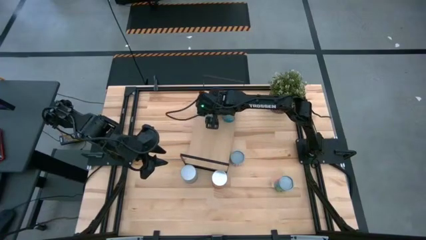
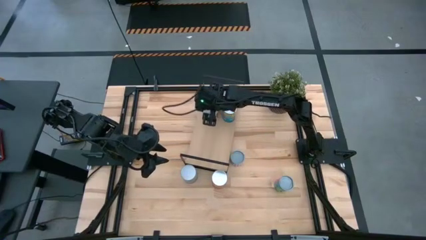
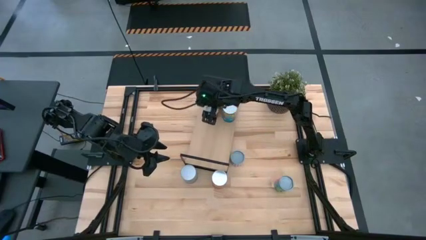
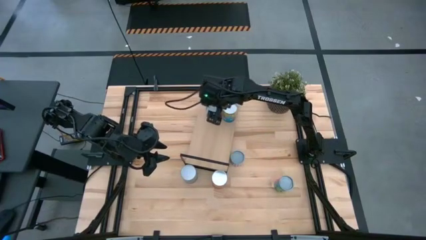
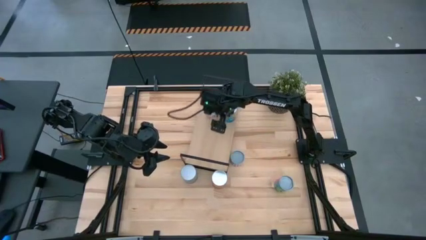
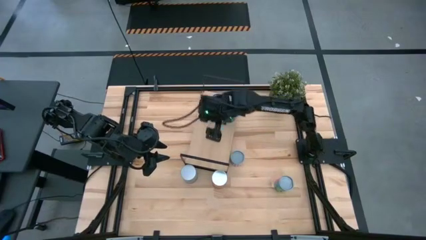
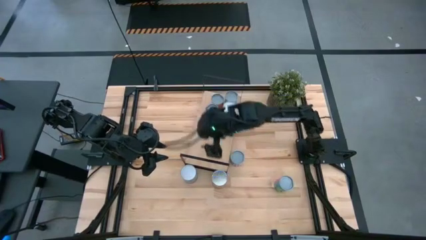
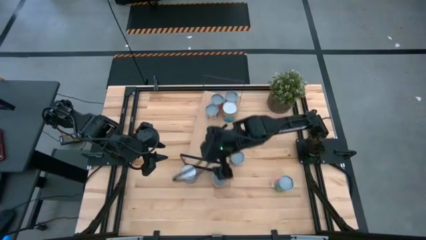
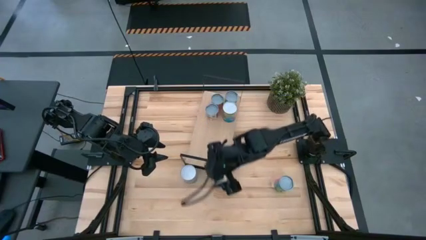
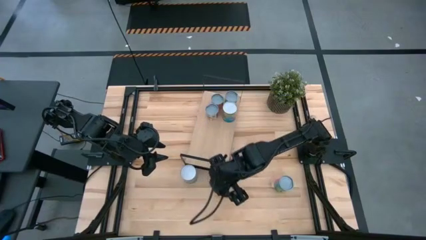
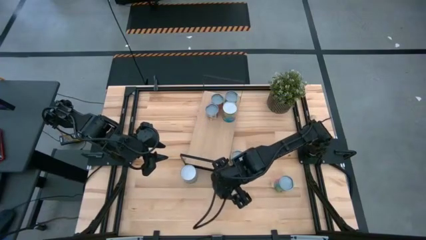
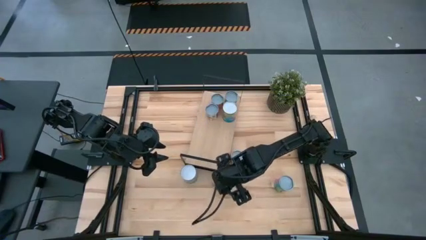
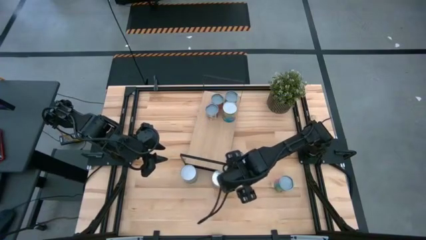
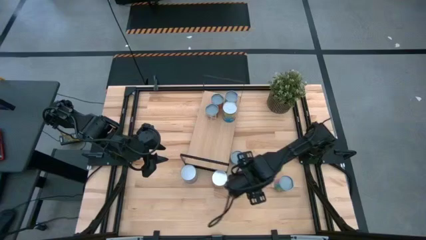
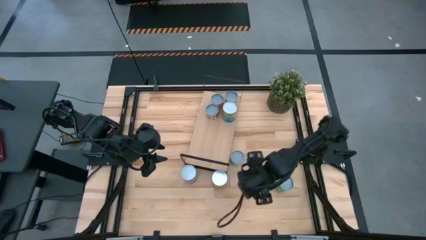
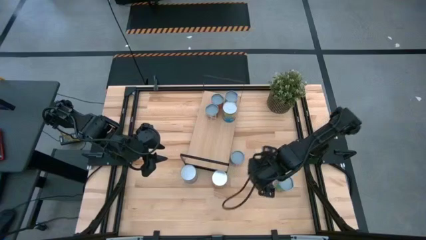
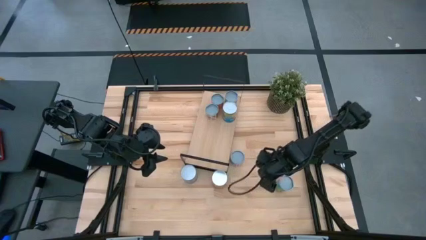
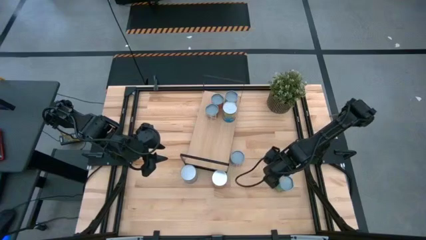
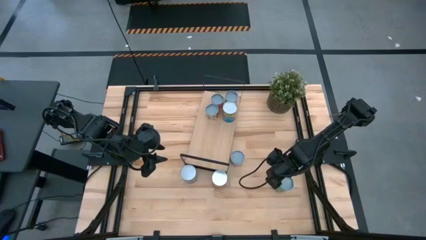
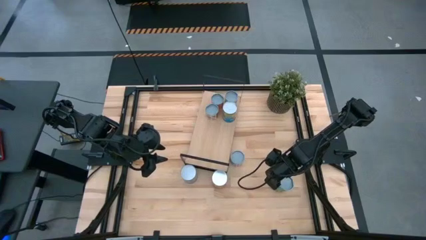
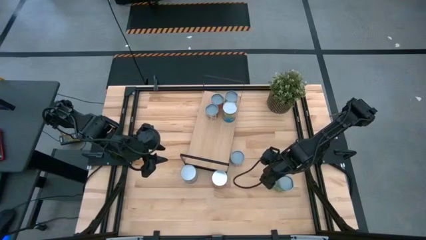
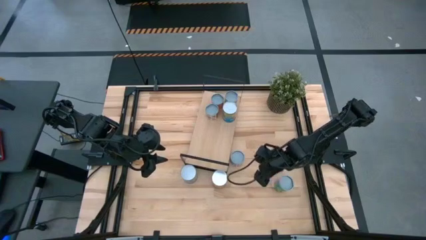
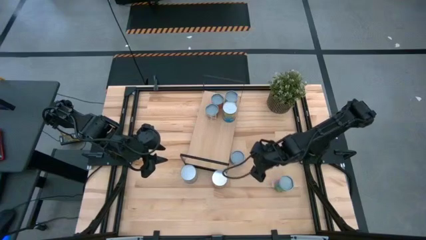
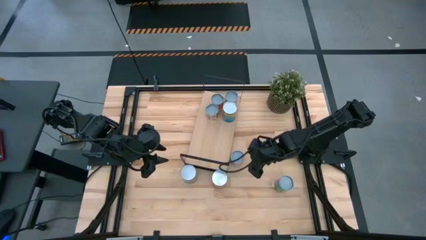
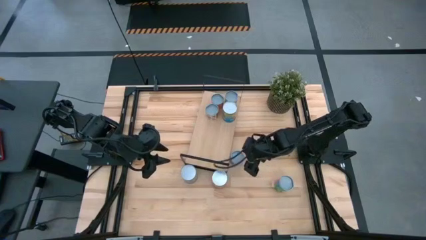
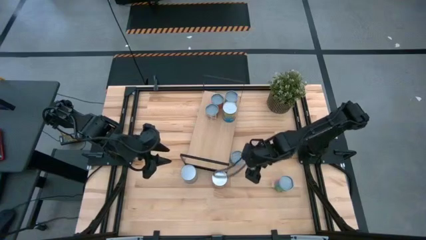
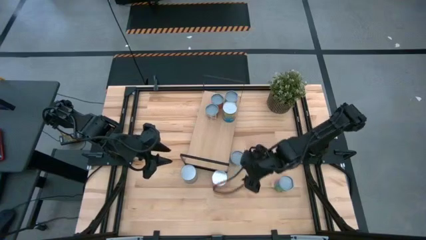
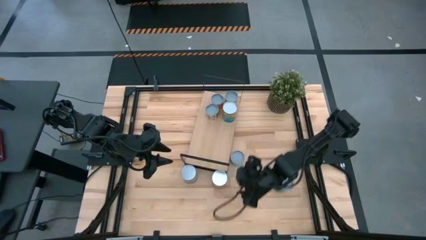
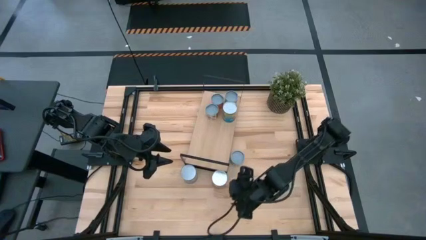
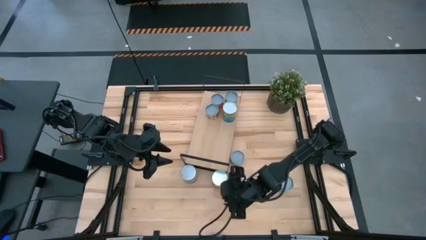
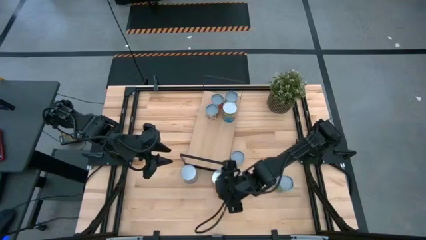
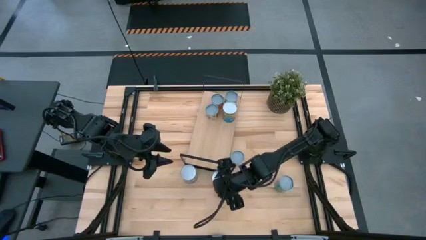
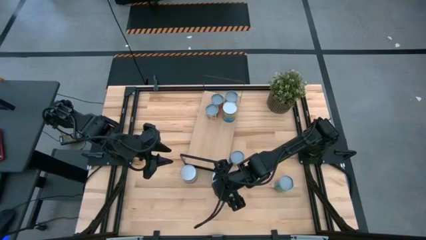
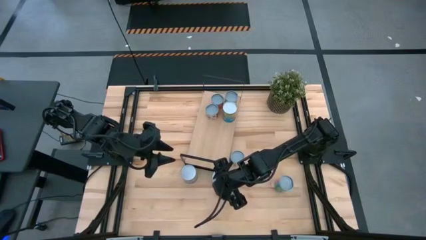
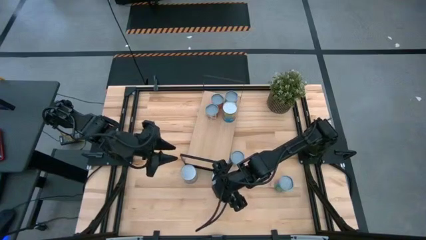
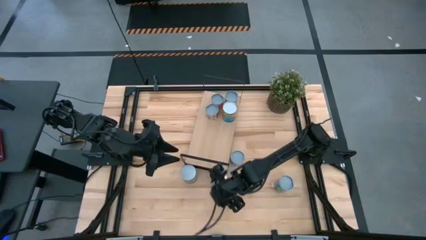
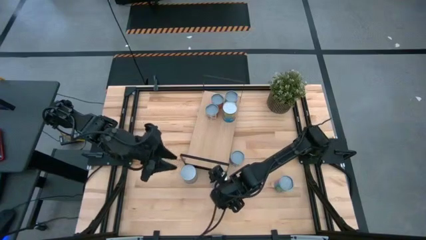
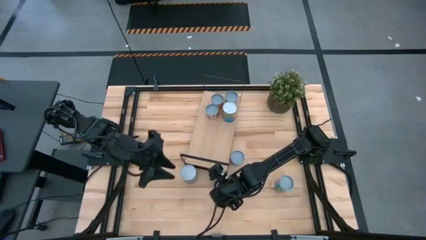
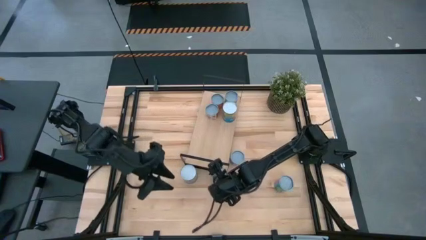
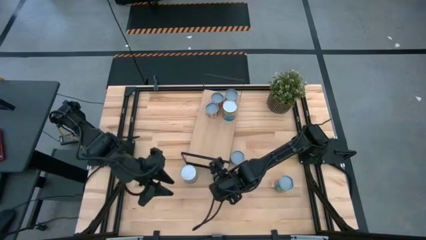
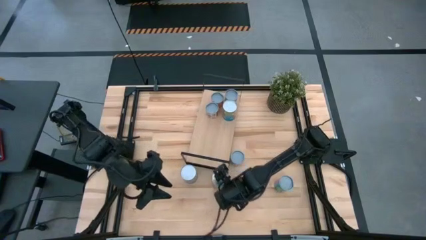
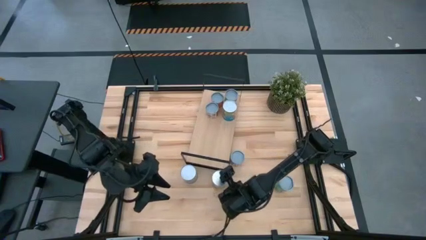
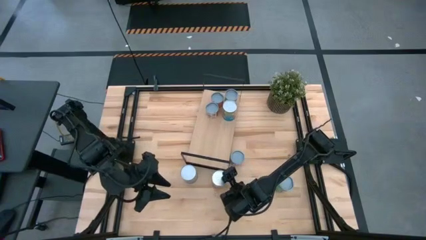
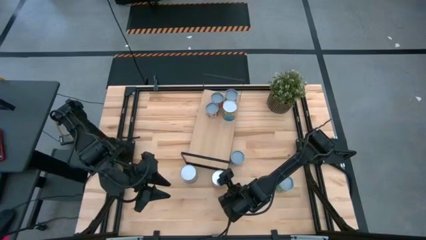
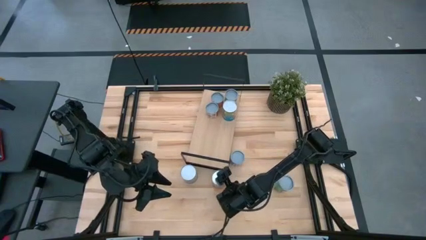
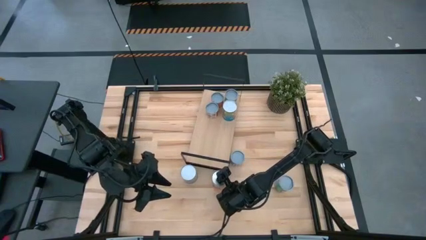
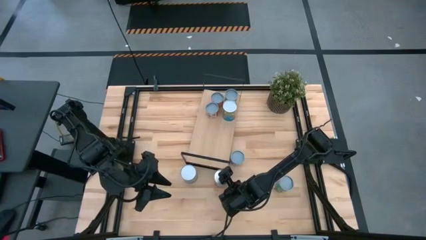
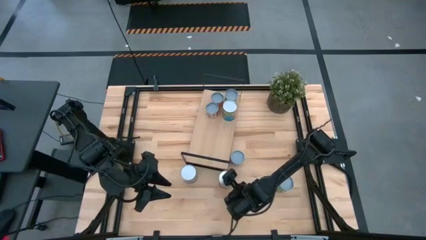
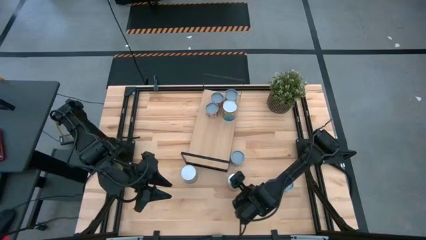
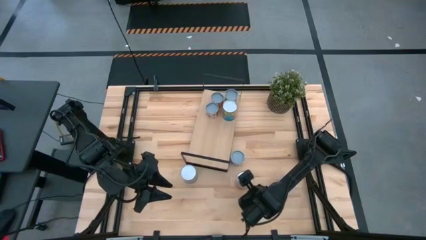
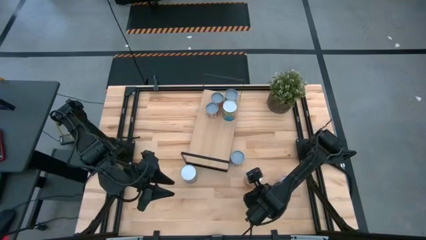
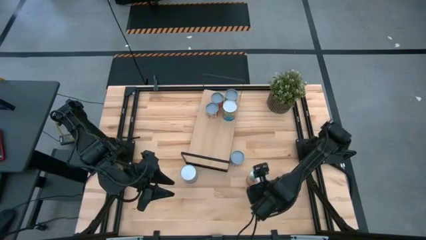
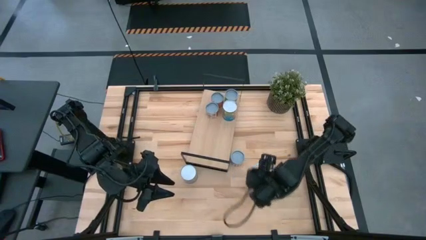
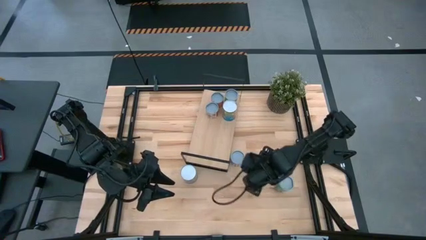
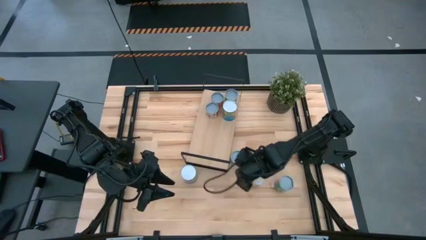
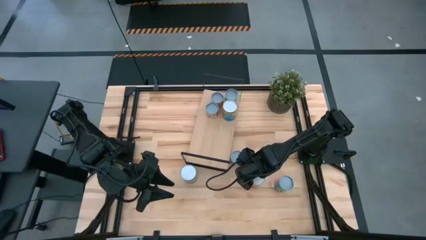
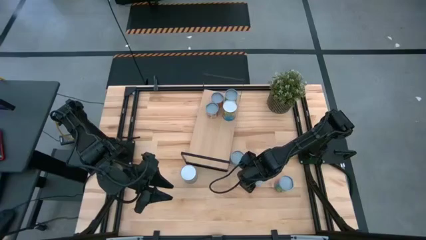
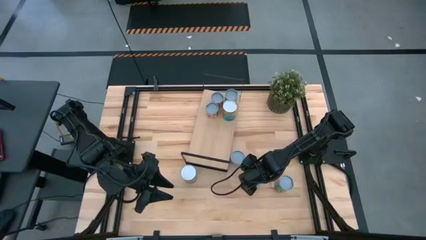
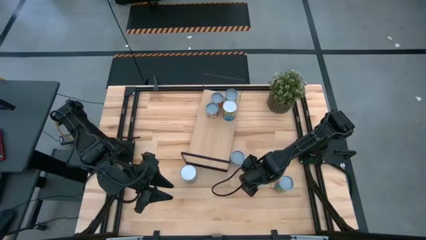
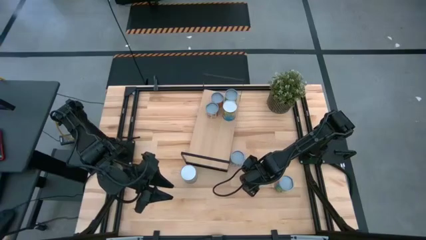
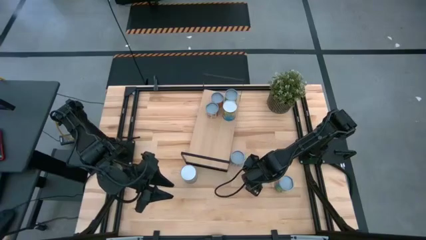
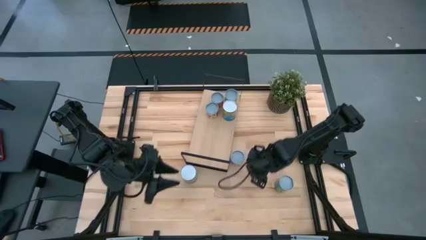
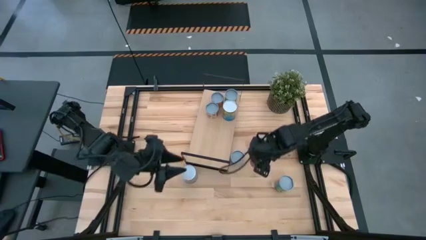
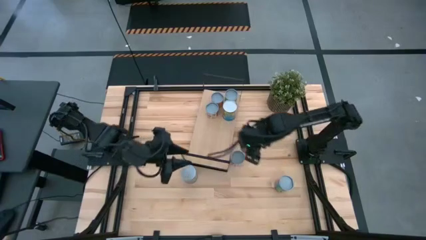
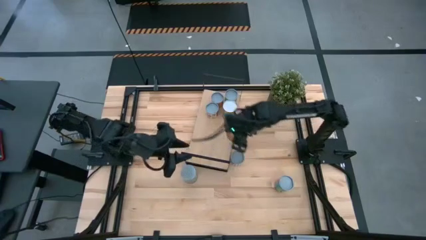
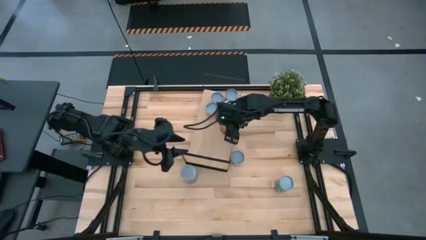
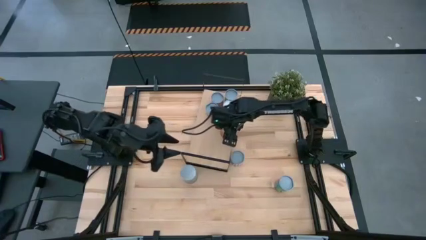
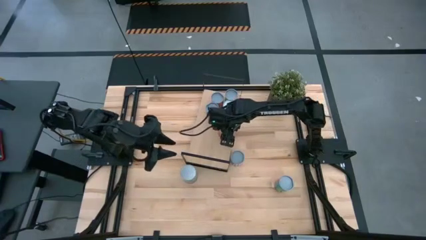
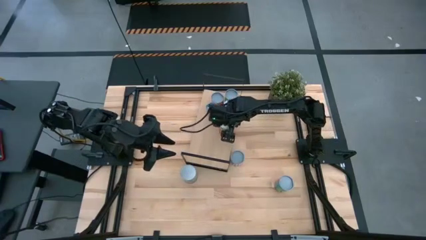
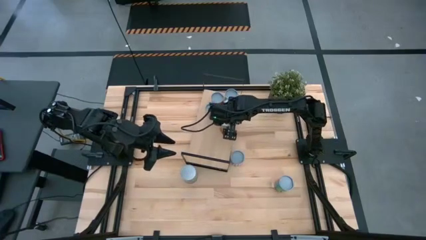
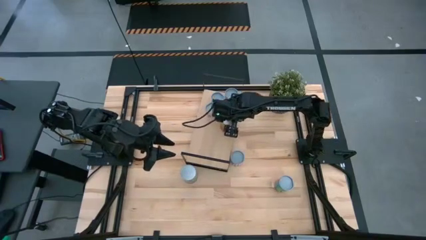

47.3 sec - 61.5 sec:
Task: Pick and place cans onto a shelf
Put the orange can on the shelf
